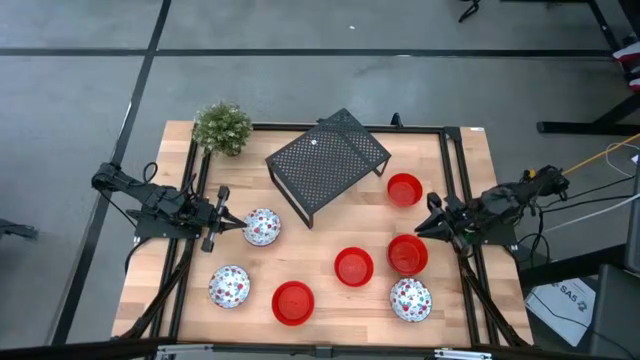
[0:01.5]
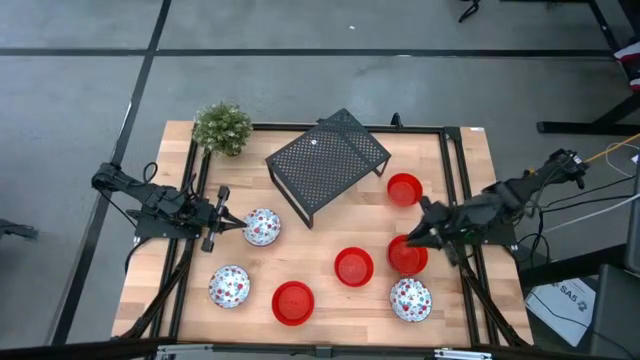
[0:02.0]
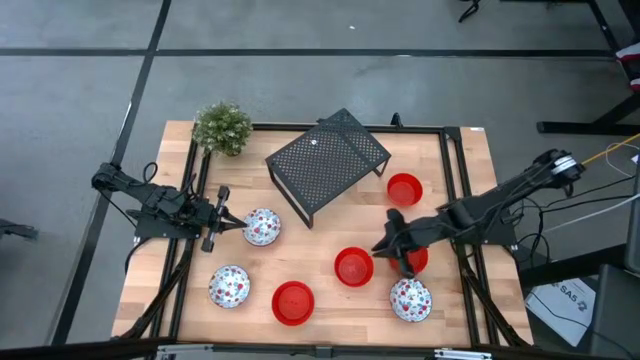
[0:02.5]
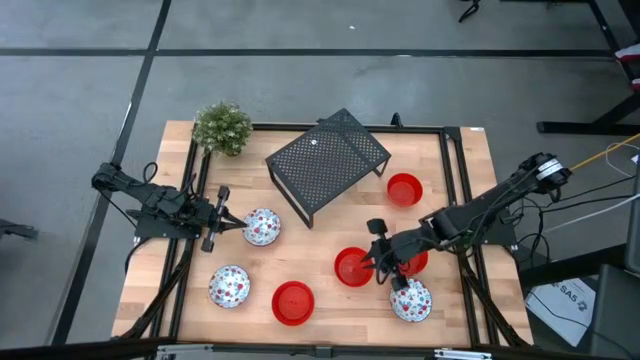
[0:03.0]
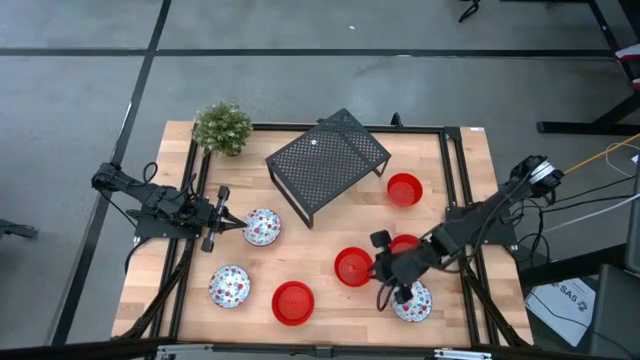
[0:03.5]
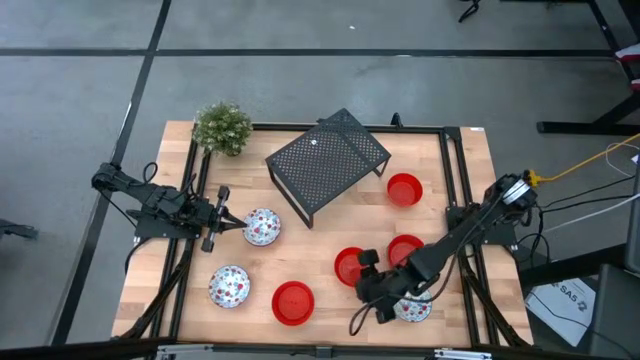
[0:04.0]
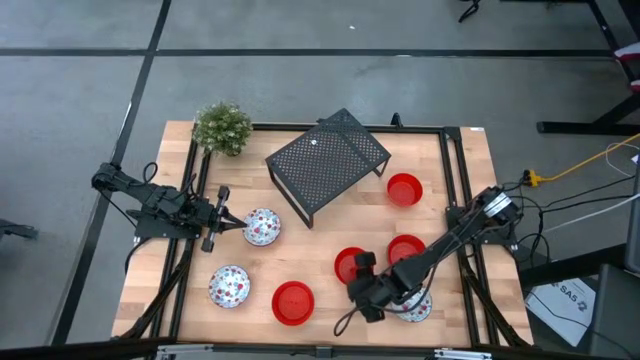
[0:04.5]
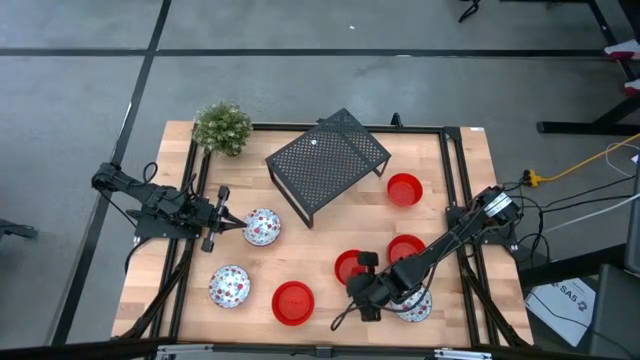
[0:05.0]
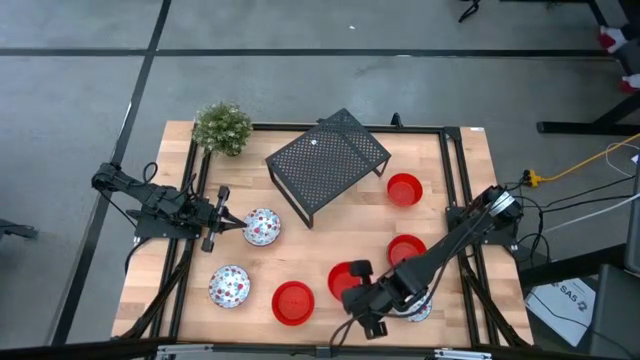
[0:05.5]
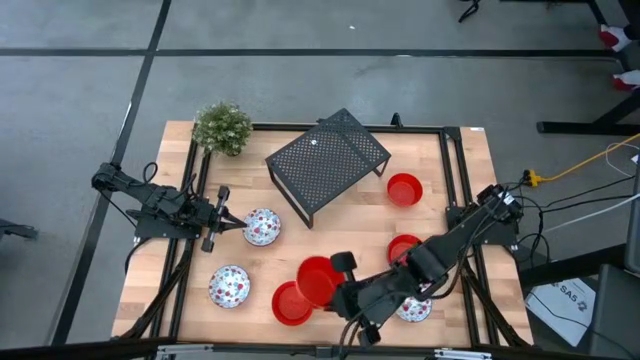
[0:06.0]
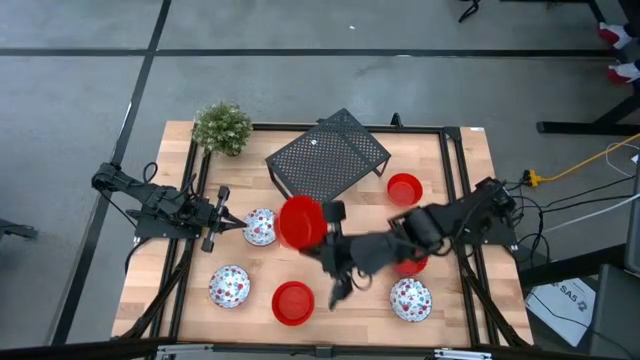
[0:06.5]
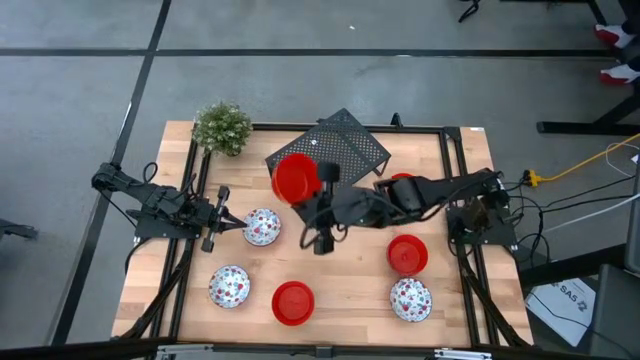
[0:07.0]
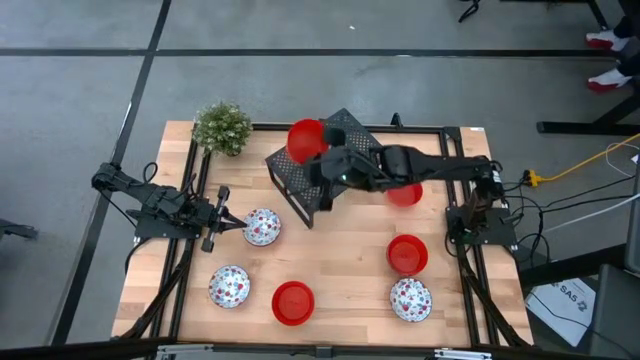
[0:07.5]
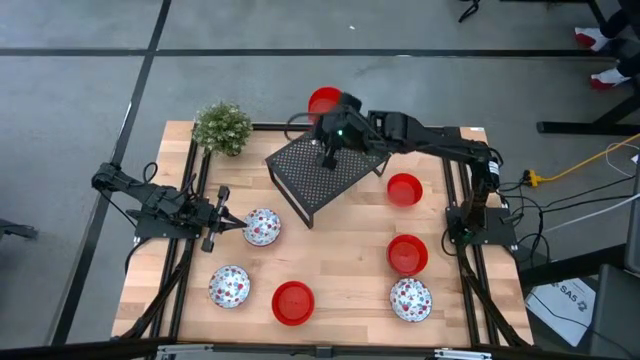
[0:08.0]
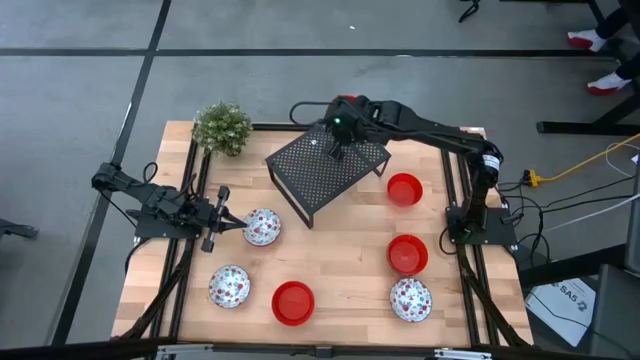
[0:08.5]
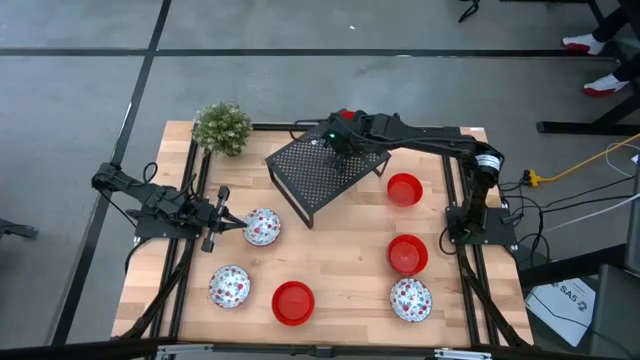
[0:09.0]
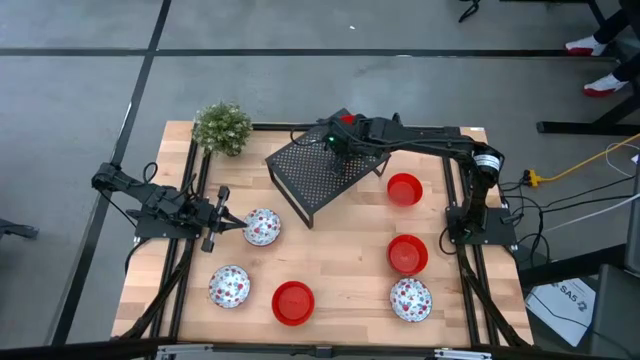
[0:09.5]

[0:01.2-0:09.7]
Task: Pick & Place Mini bowls
Put the red bowl on the shelf

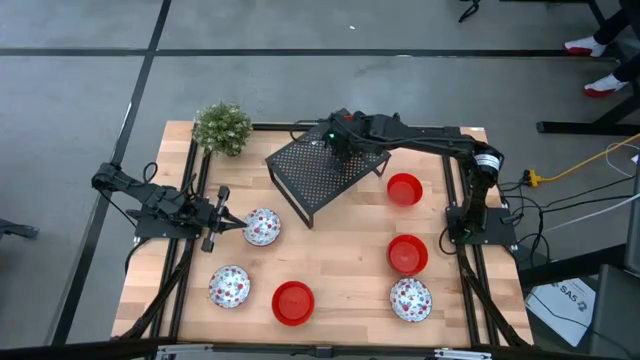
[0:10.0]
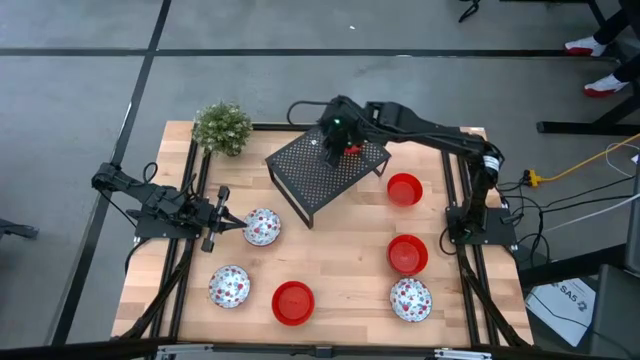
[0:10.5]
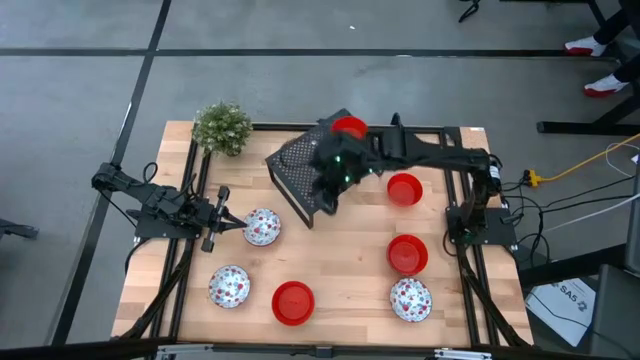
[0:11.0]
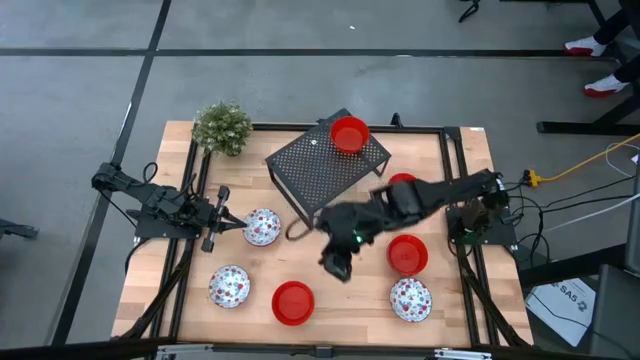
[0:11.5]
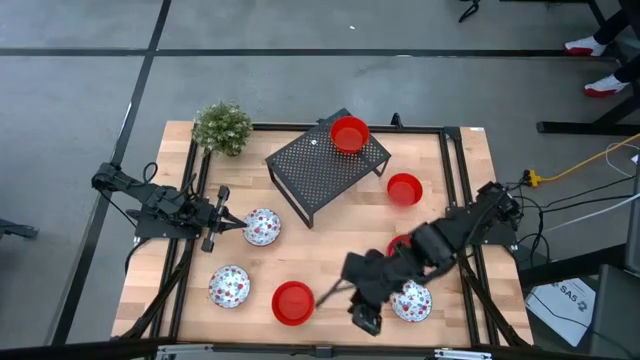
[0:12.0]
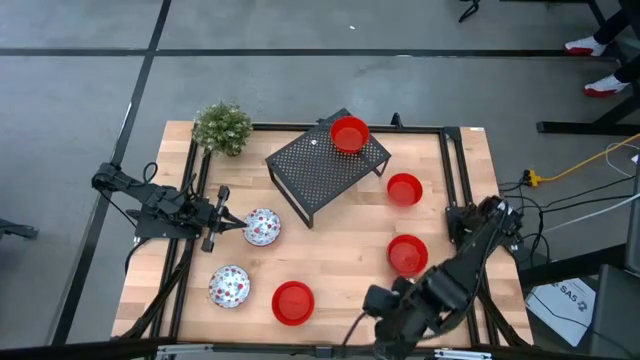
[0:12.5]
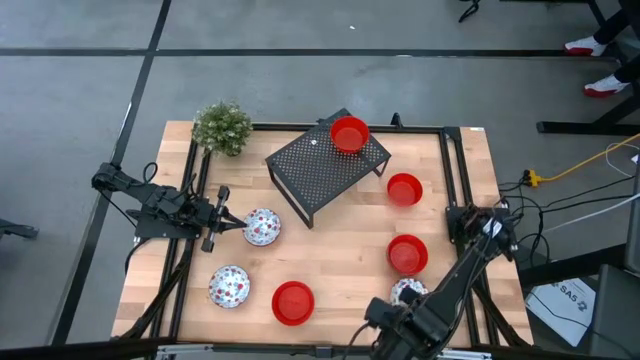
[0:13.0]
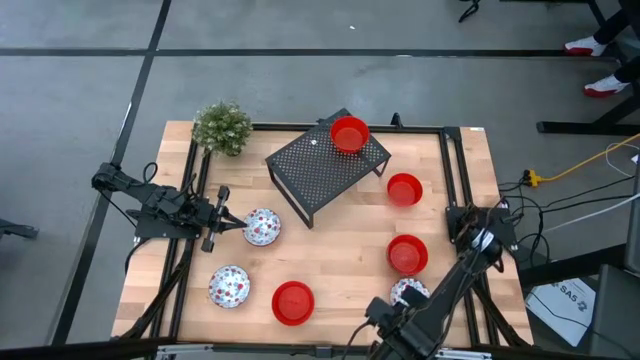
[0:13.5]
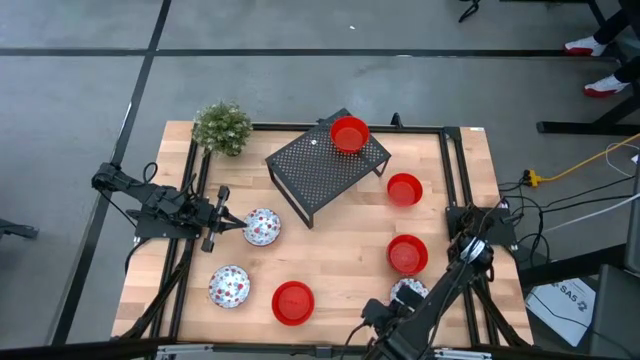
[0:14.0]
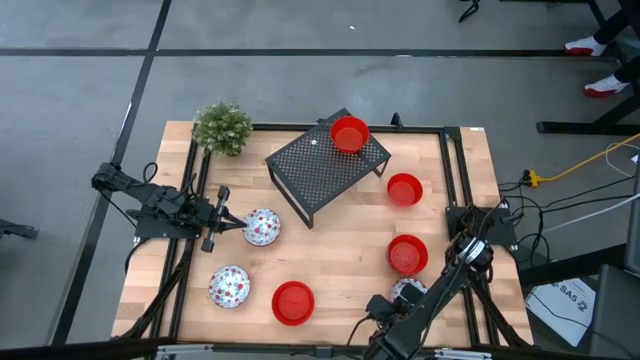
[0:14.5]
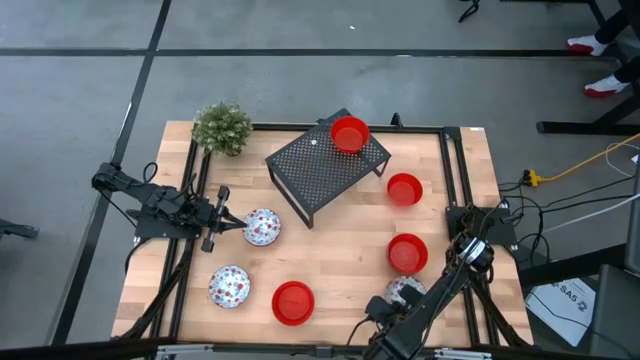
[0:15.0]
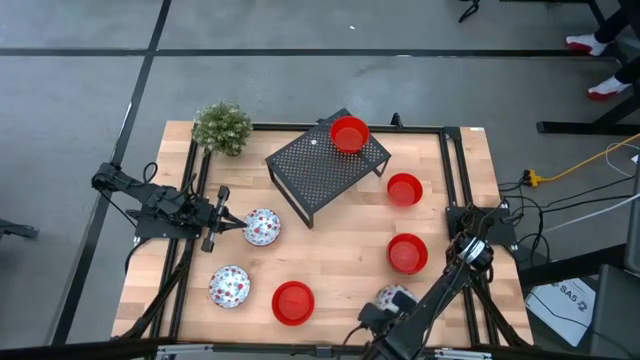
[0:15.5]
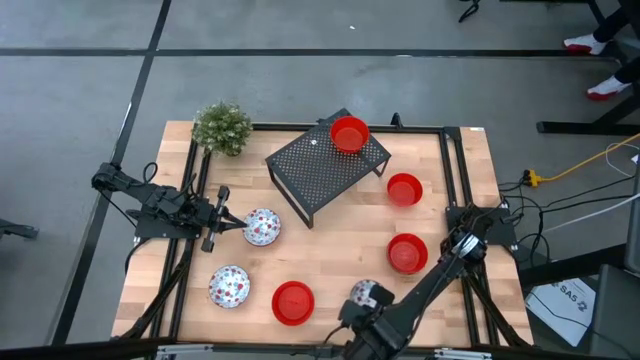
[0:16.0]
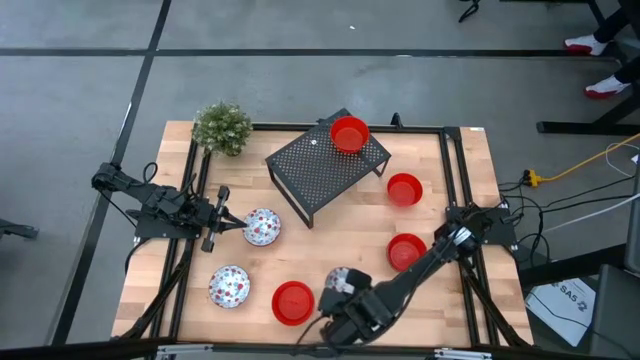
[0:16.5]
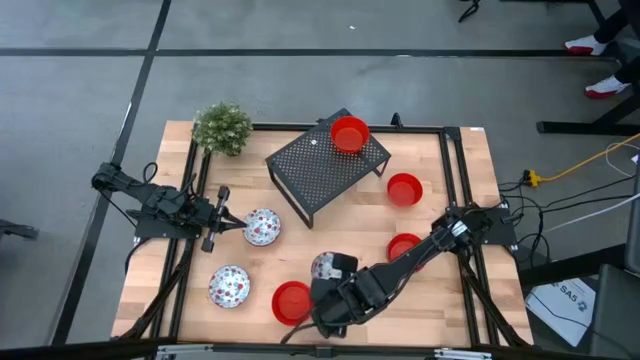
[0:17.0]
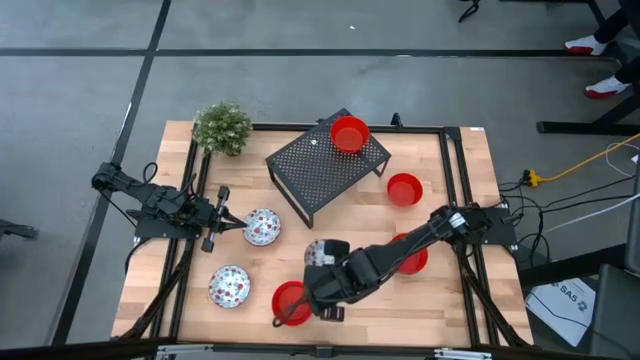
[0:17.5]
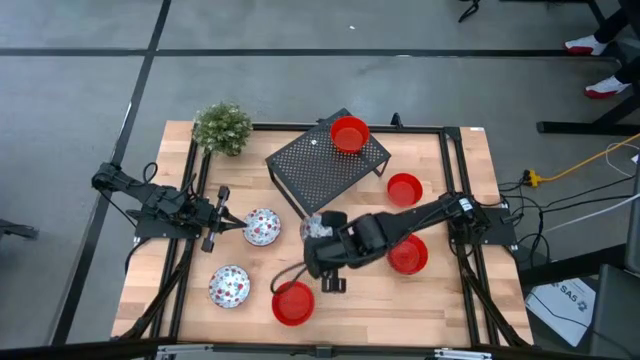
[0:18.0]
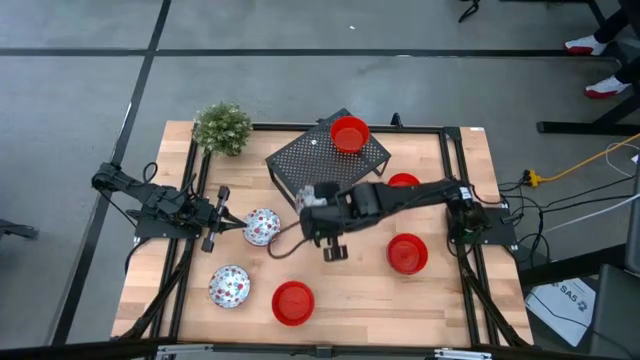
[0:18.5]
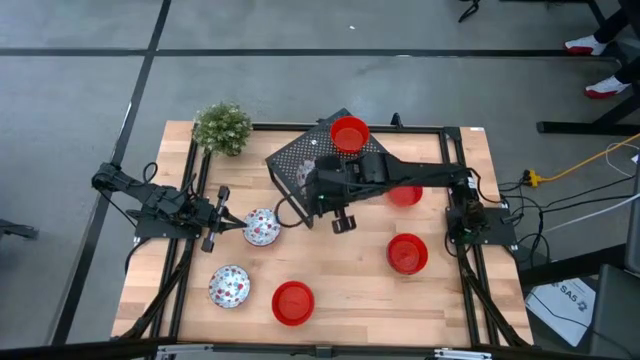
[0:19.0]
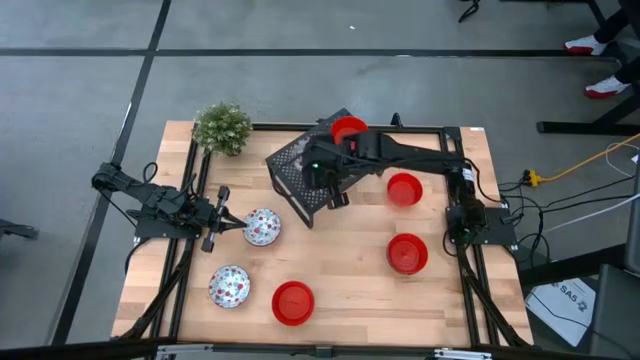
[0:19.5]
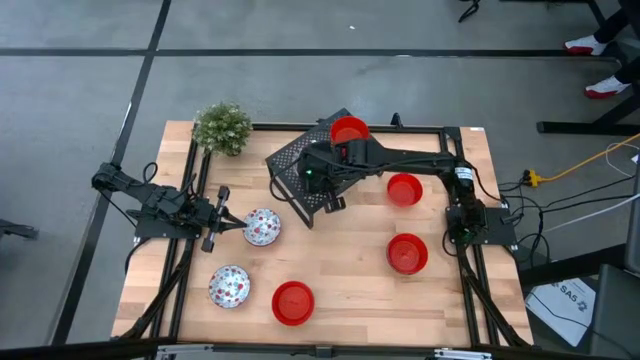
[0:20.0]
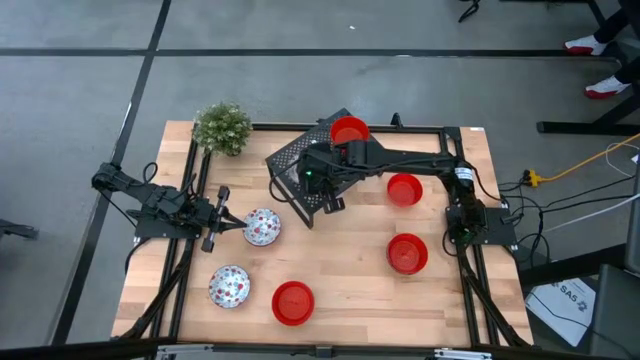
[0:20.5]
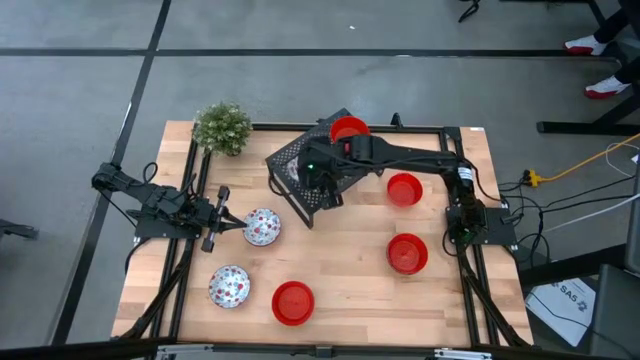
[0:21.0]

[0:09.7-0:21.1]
Put the white patterned bowl on the shelf
